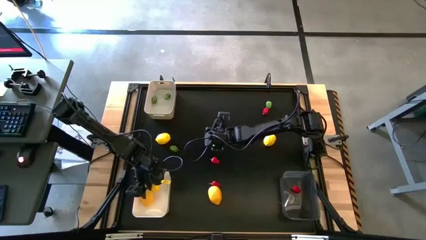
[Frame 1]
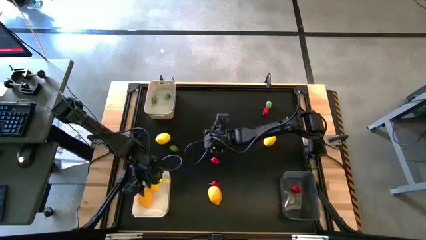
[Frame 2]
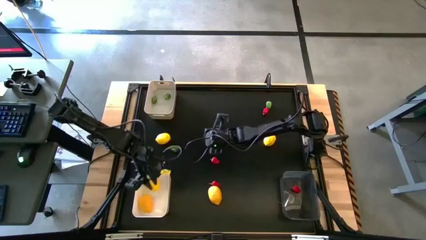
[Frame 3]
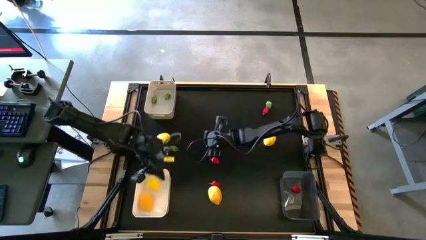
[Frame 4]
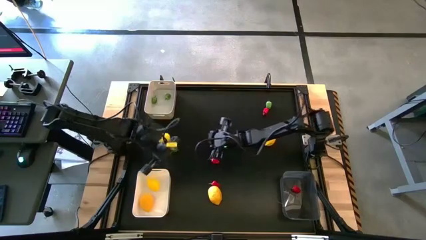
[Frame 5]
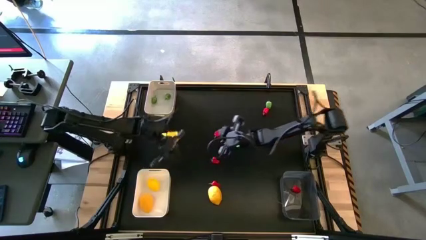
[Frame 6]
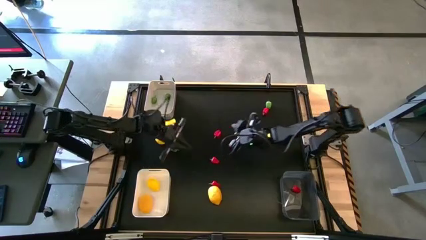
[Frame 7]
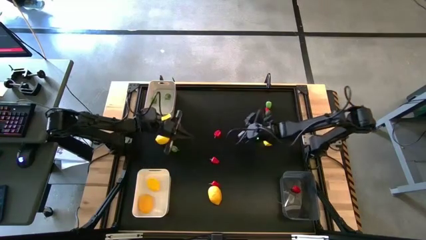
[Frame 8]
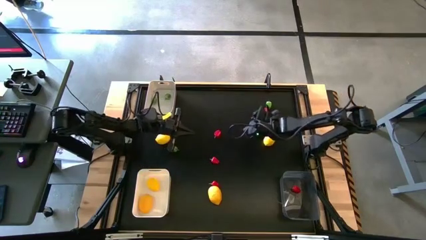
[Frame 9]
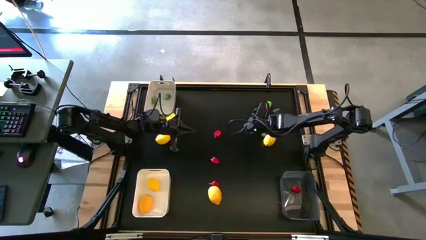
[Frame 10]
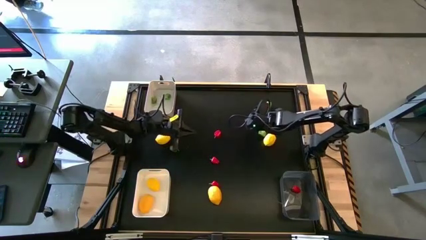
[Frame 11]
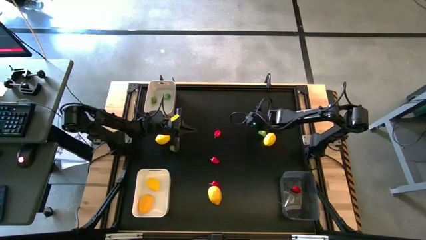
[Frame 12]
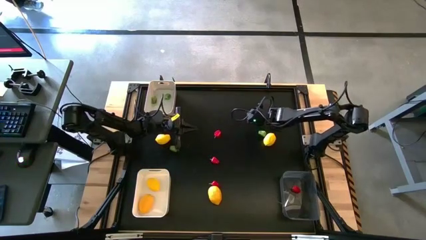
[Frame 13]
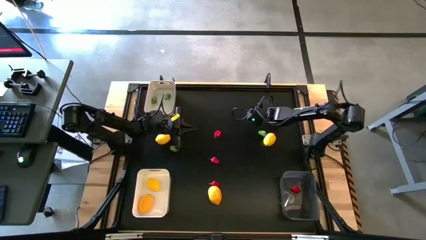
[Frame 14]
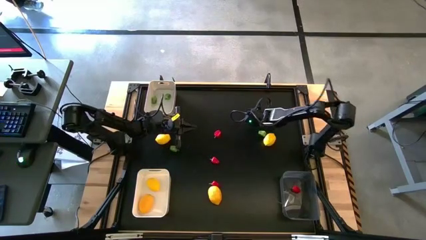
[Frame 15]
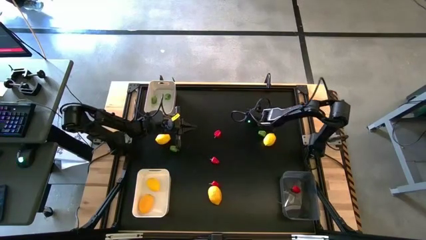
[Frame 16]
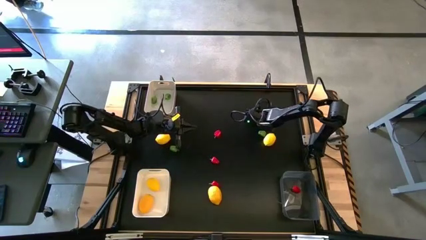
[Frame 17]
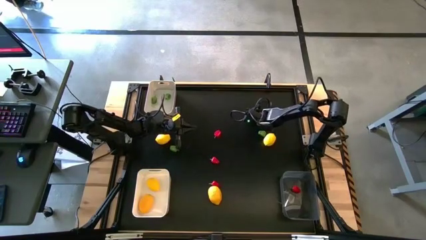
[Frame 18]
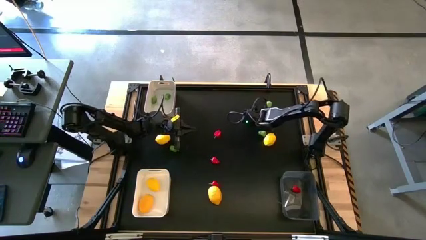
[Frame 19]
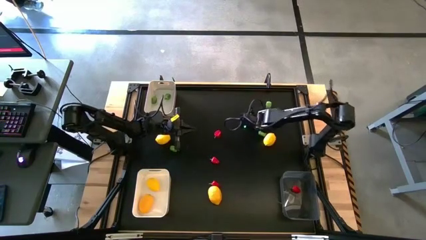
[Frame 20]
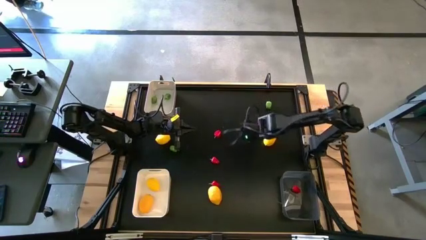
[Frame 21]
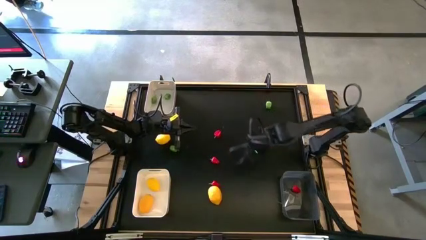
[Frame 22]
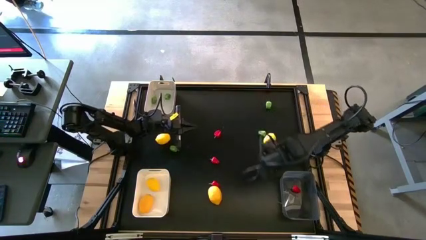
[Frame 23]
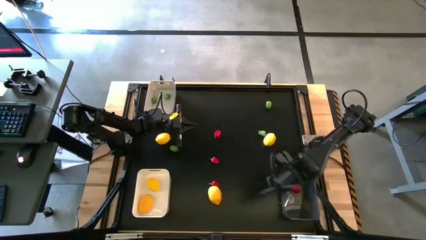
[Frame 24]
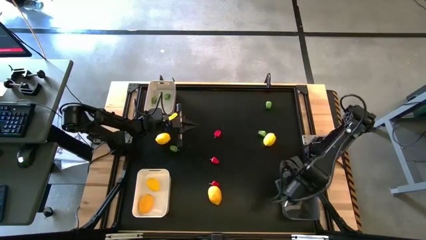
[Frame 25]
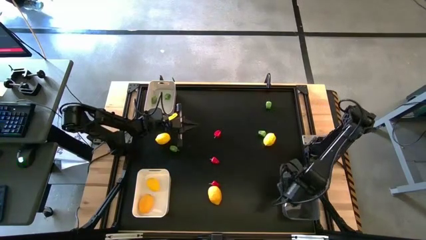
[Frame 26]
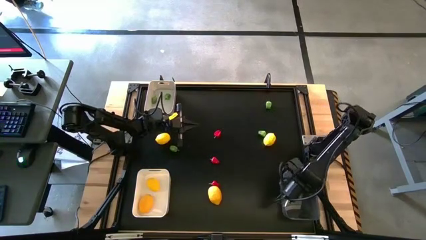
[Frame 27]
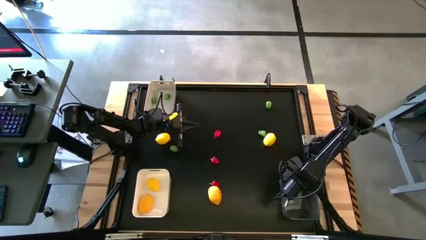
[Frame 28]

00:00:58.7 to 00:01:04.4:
Task: Sort produce into baskets
Put the red chili pepper into the black transparent bin

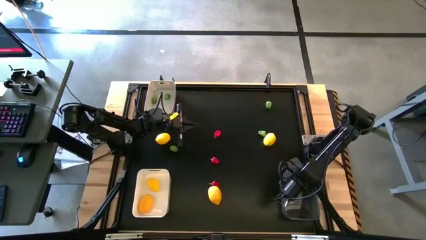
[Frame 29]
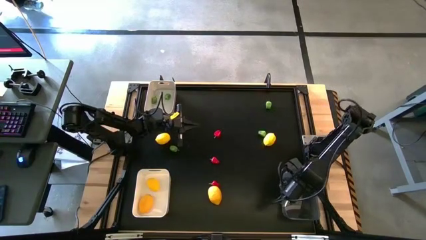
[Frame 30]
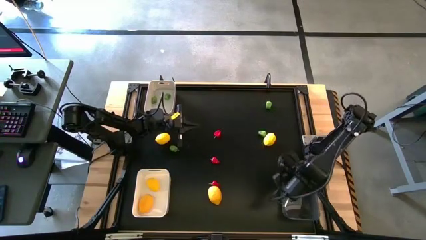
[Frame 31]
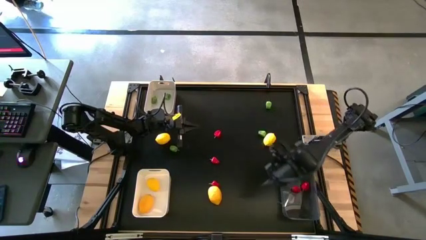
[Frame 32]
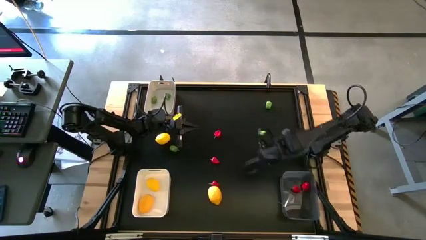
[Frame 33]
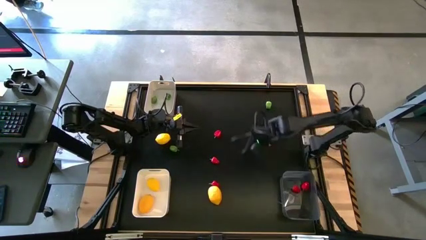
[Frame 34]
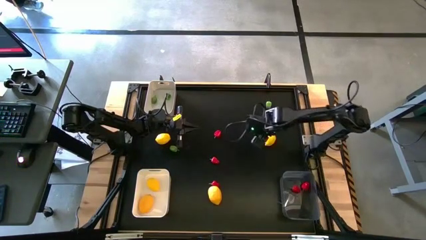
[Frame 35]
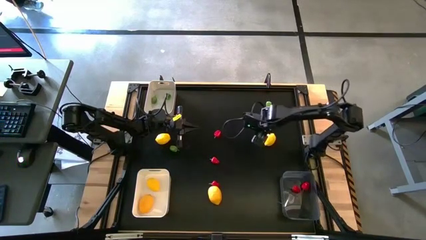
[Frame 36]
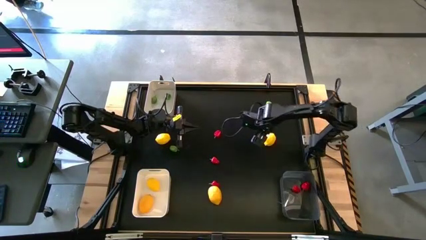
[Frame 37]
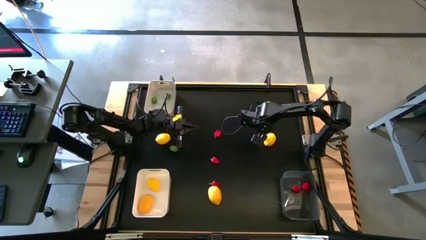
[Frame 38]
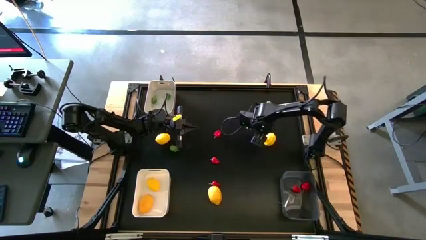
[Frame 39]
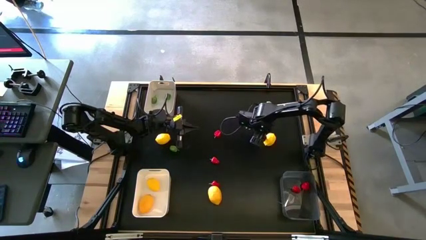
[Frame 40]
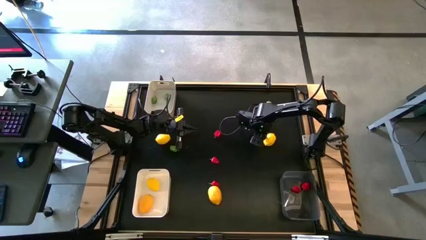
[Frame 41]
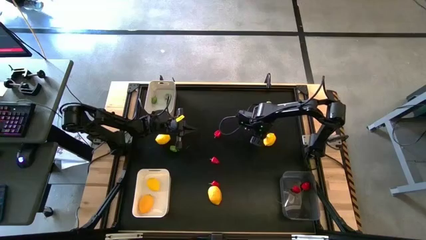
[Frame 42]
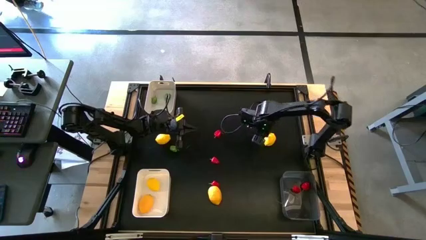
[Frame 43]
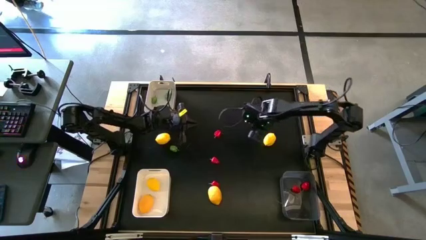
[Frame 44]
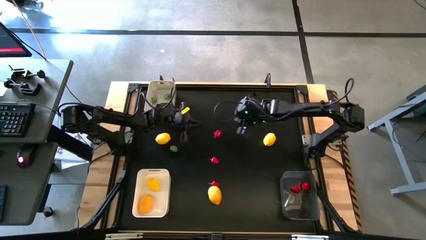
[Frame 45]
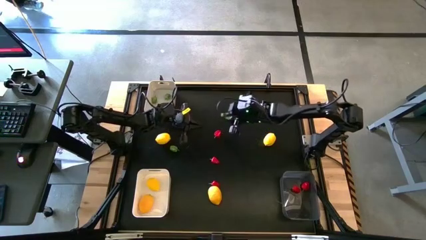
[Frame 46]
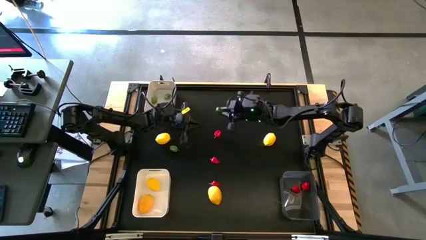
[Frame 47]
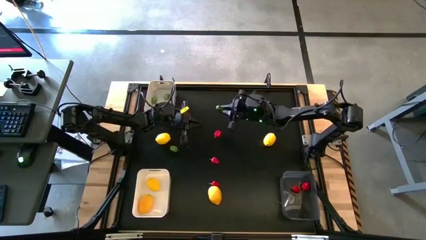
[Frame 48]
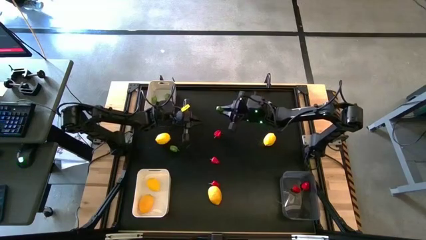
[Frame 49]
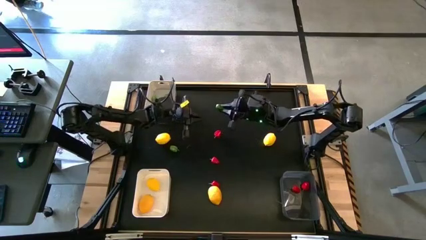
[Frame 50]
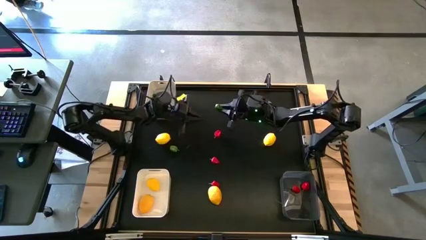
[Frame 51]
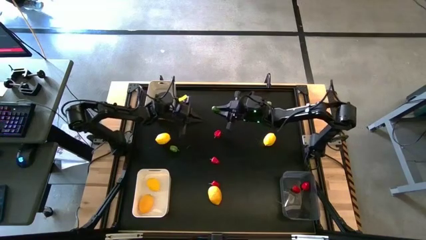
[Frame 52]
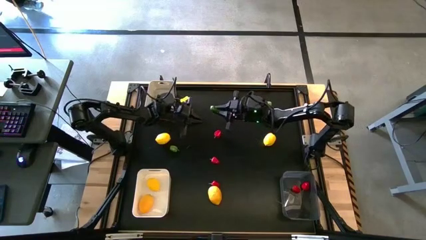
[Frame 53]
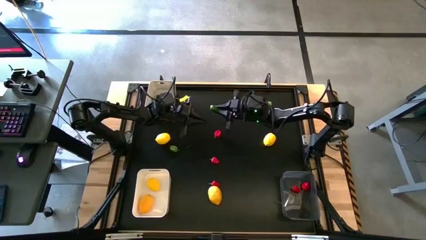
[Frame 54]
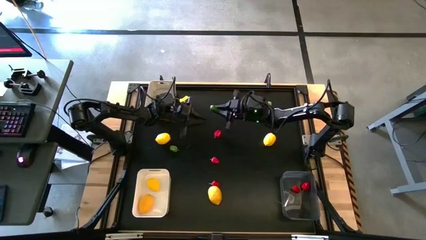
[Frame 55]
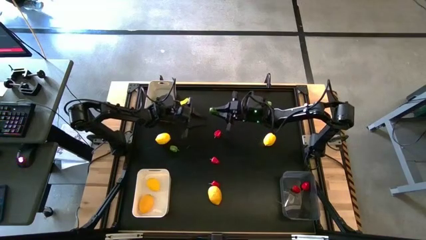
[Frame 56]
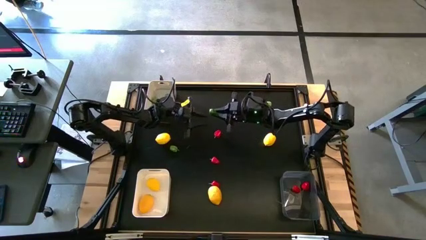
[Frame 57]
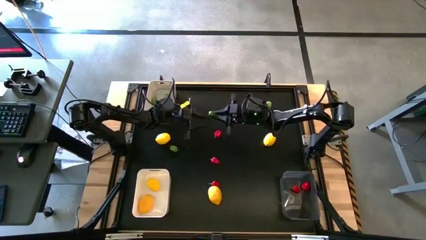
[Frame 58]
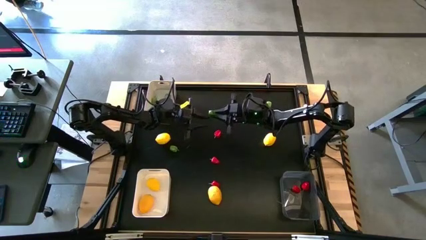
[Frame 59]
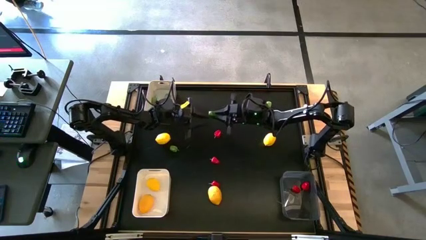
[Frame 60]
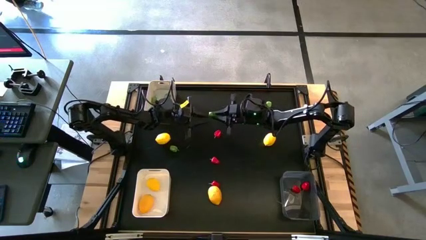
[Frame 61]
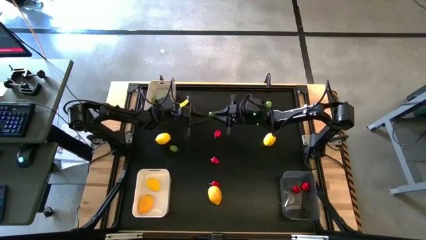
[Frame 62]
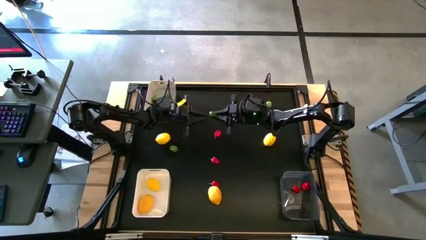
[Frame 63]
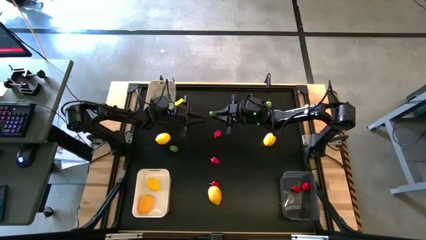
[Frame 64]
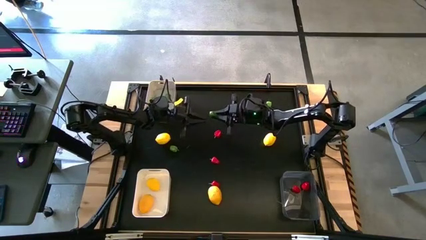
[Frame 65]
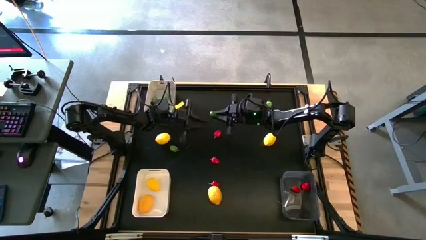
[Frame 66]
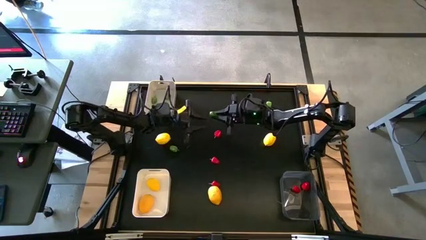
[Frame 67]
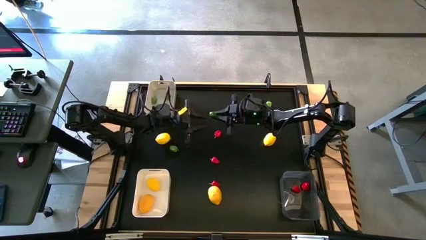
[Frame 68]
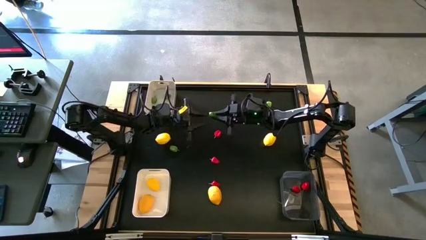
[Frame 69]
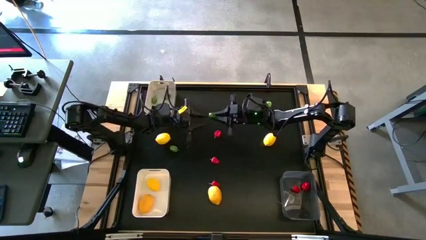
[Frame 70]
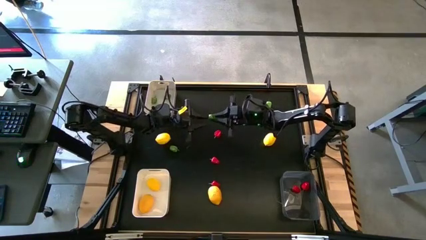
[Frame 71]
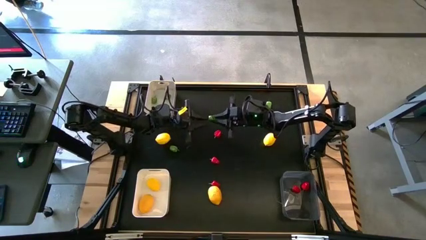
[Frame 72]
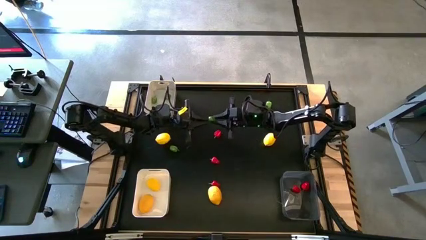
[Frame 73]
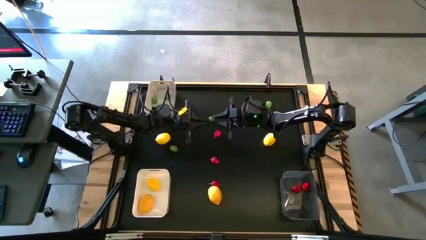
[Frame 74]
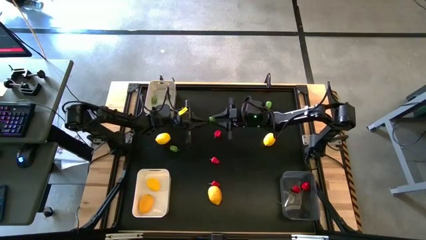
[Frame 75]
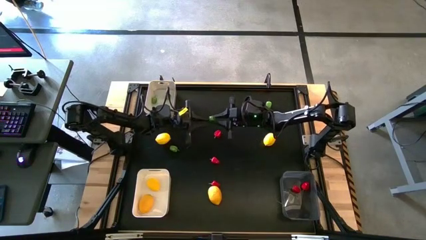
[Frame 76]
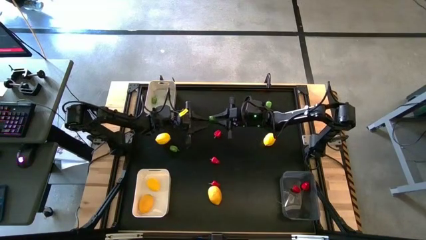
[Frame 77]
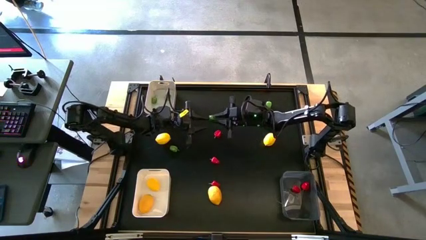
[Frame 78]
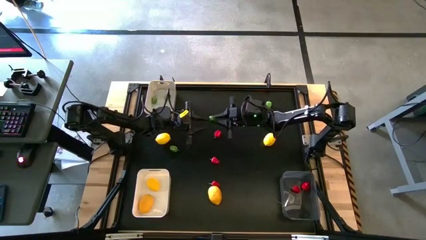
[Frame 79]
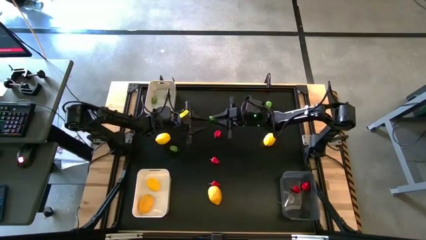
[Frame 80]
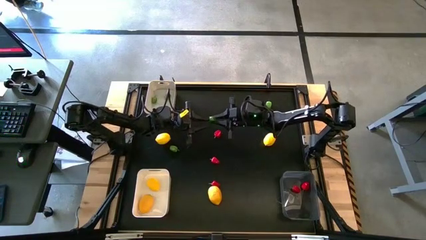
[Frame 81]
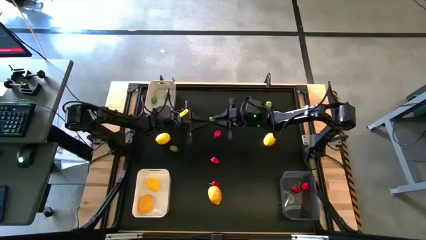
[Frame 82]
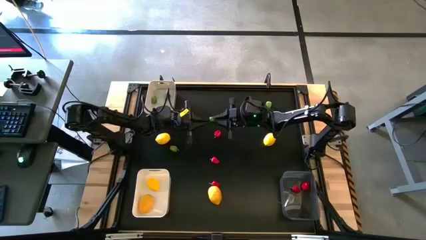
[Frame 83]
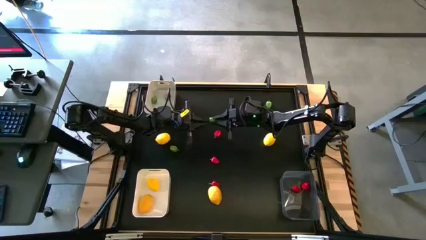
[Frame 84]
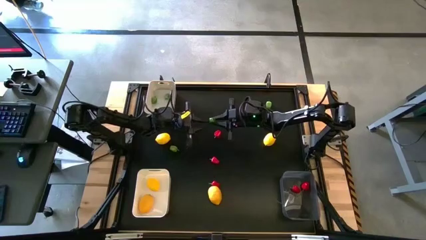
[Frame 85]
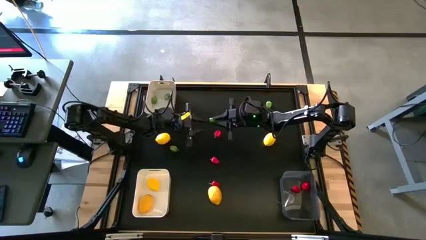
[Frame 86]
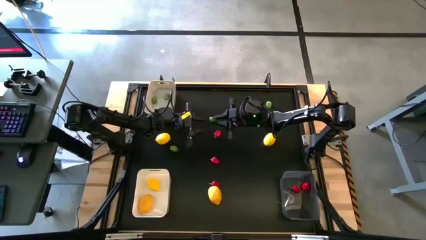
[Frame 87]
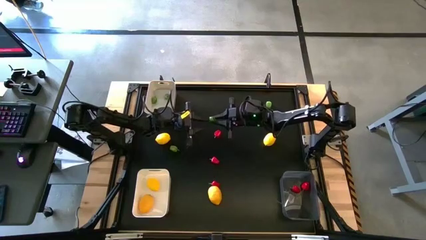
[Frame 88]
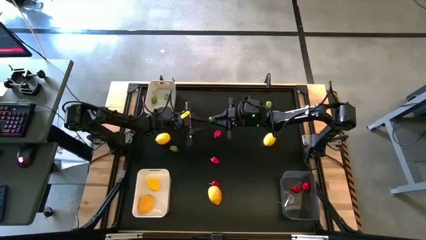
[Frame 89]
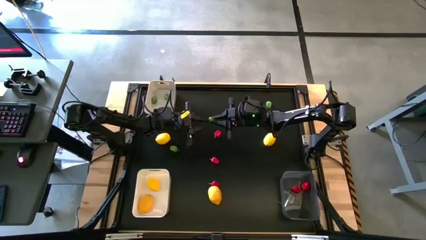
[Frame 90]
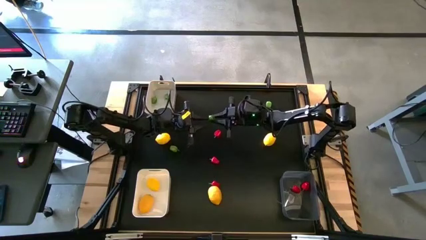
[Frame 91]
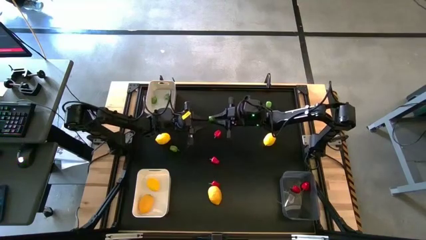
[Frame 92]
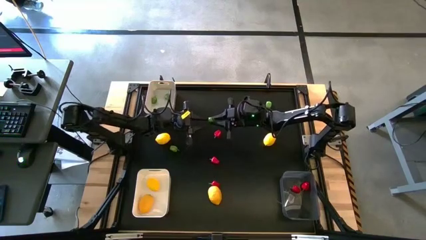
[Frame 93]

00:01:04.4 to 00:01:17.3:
Put the green chili pepper into the gray bin
